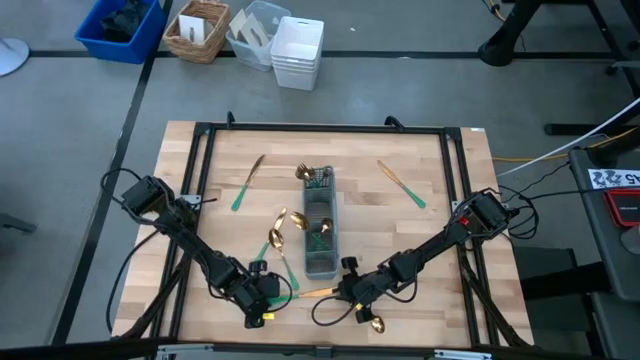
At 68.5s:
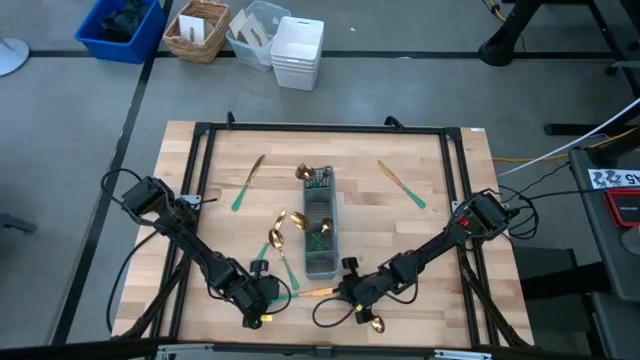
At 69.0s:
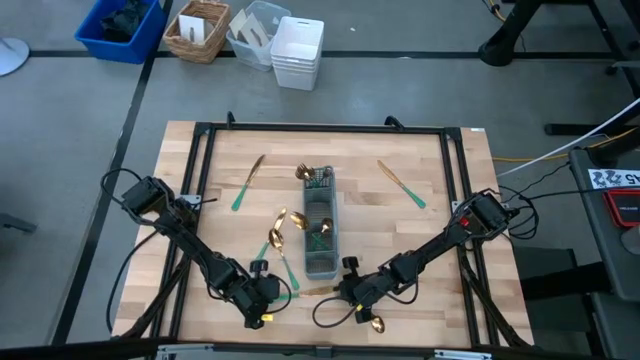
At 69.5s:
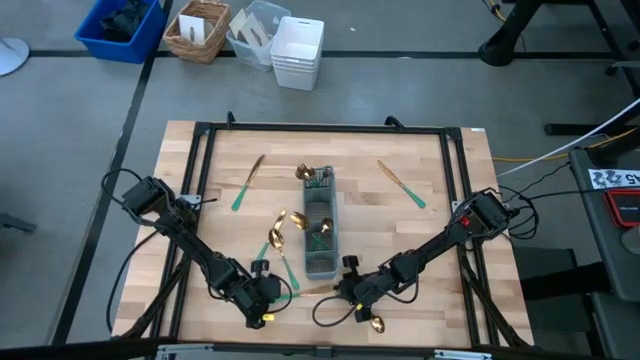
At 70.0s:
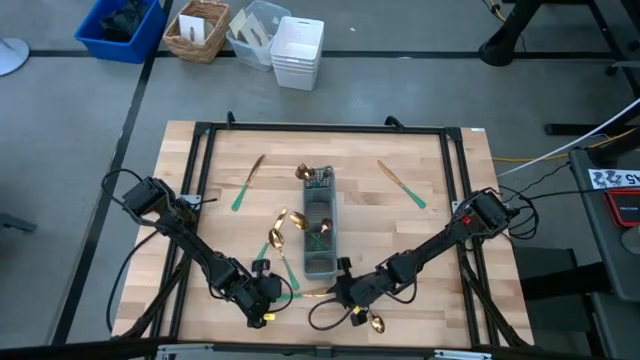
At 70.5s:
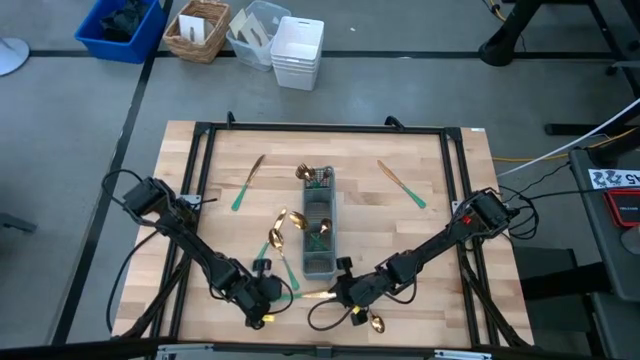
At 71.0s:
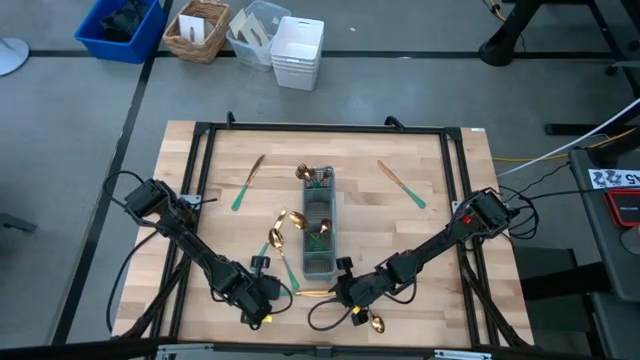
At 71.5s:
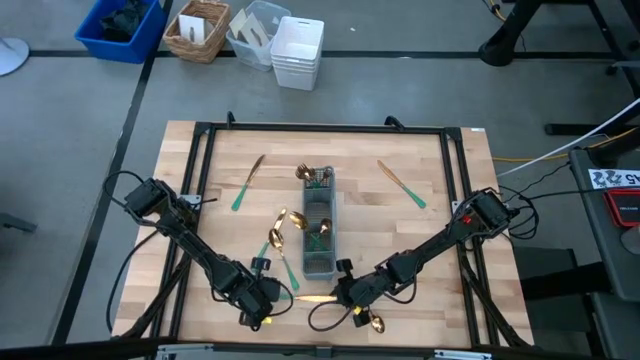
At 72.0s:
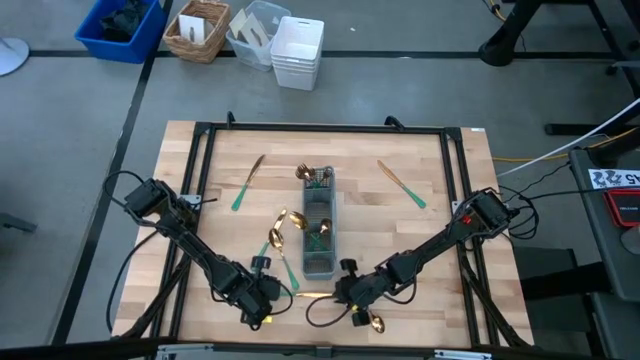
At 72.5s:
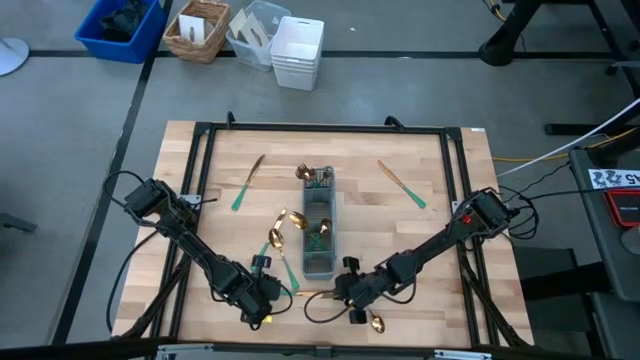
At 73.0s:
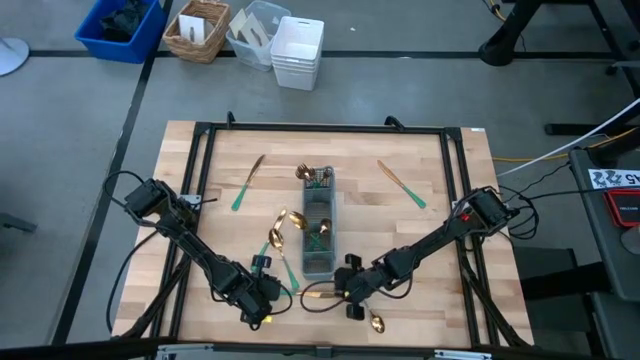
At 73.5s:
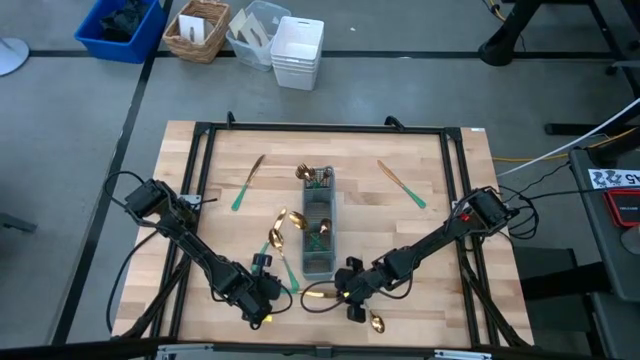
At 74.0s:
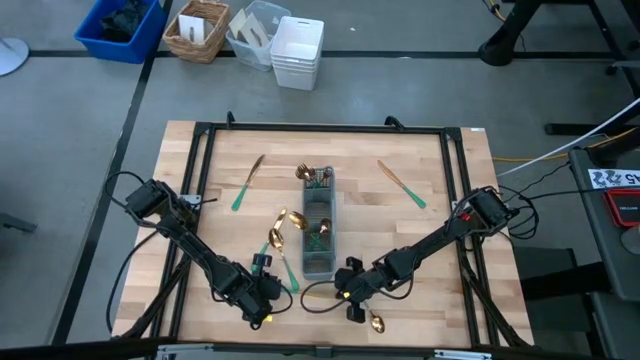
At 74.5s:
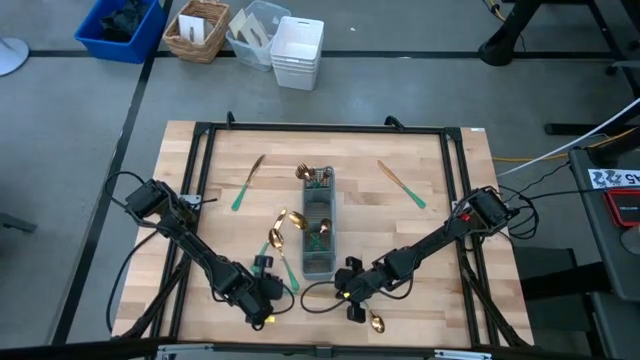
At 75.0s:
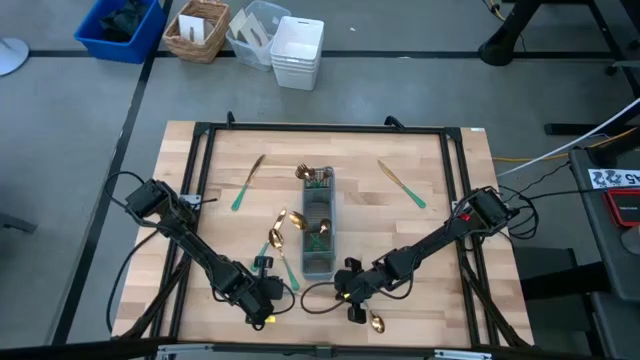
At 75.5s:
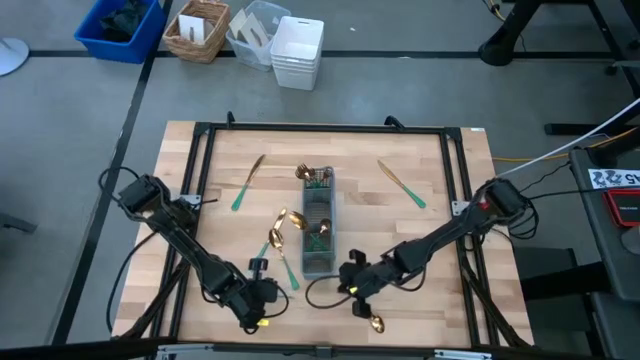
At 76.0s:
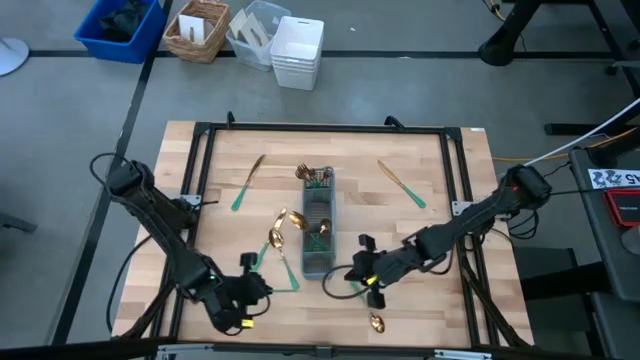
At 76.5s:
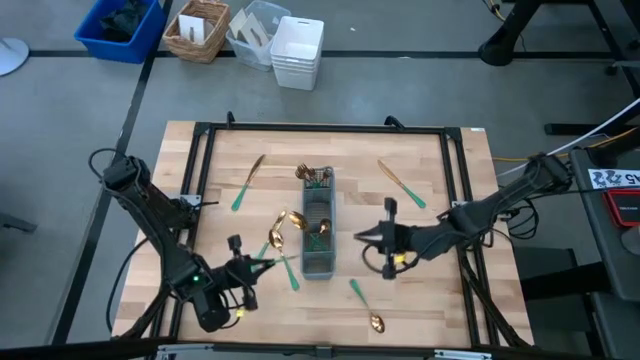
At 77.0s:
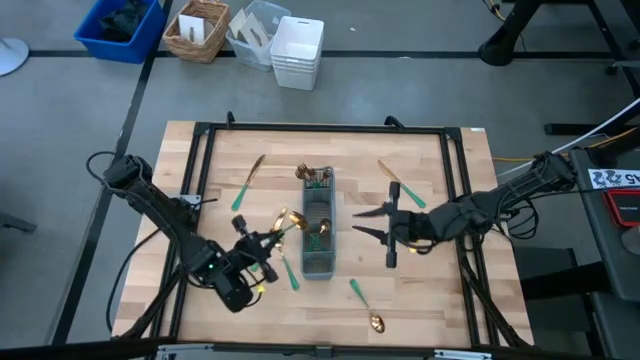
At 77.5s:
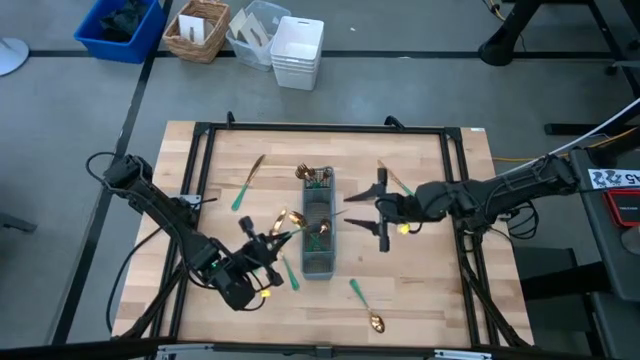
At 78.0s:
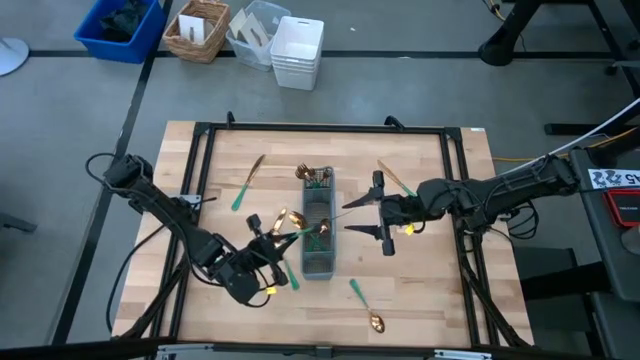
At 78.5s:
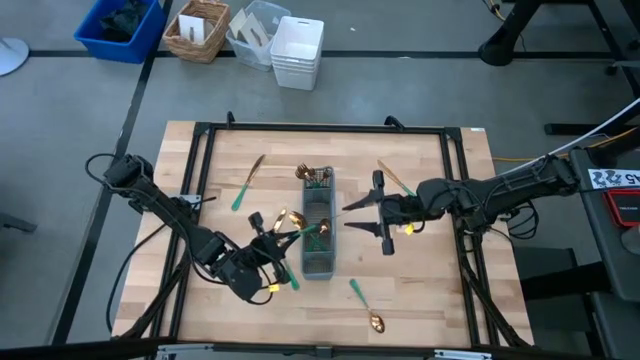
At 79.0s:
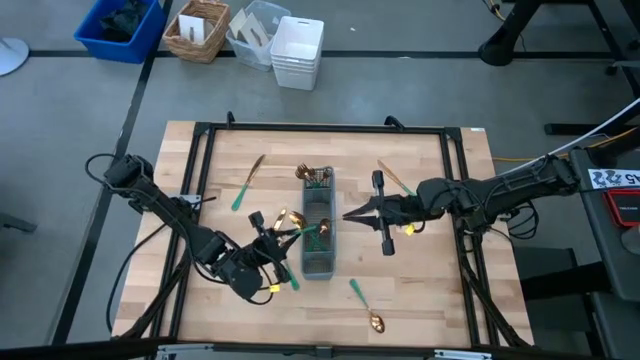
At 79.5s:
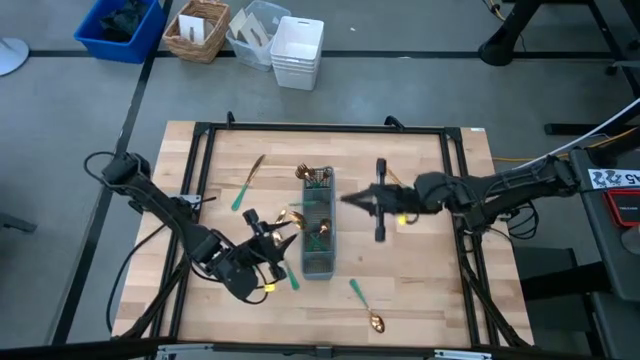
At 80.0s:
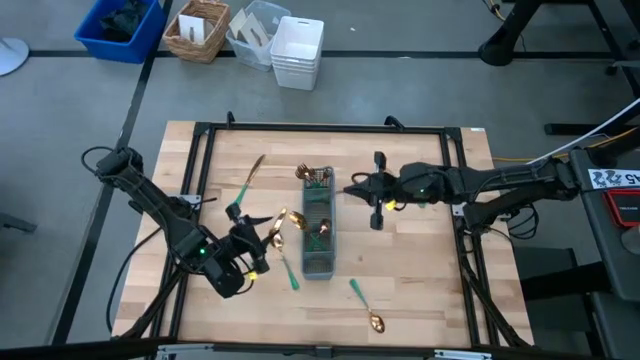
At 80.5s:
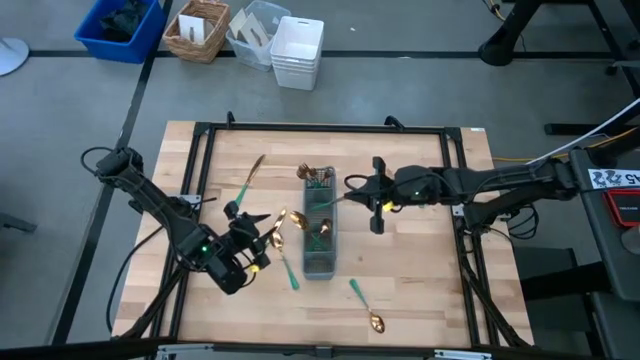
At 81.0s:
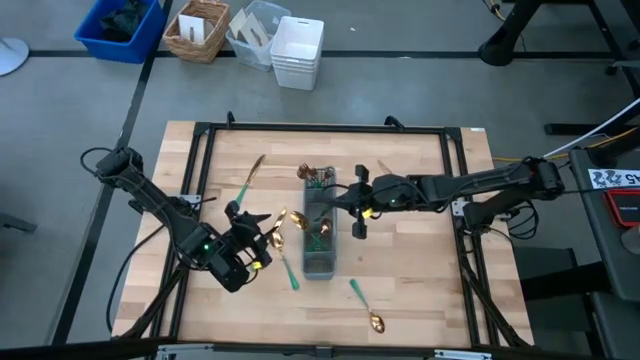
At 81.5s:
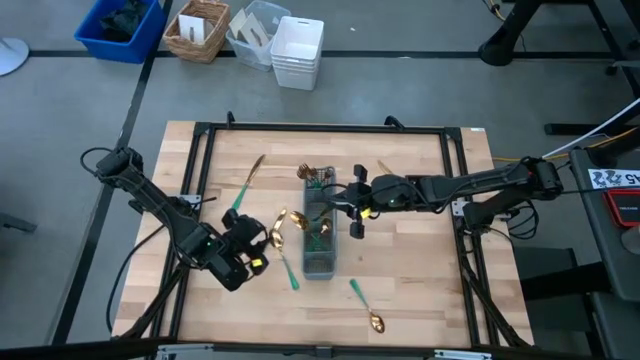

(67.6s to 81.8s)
Task: Sort silverware
Put the green knife into the utensil rack

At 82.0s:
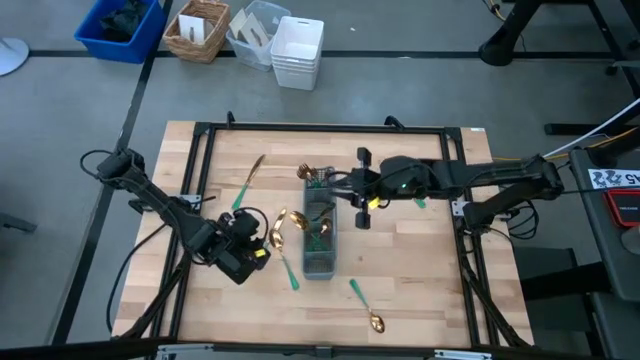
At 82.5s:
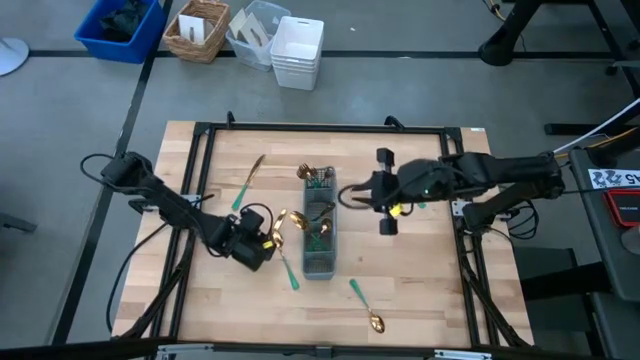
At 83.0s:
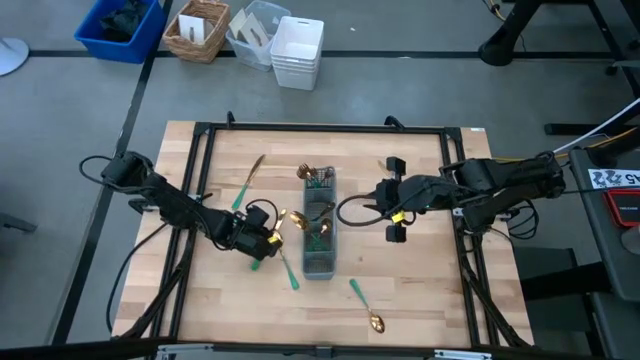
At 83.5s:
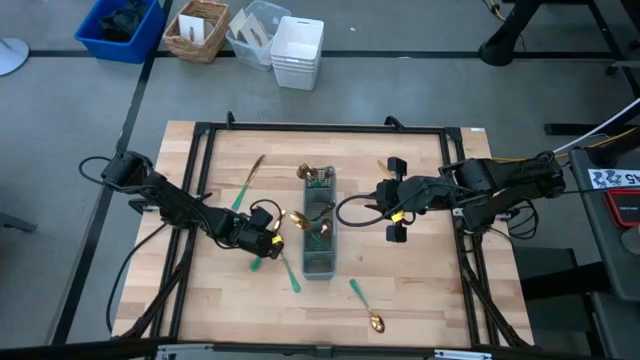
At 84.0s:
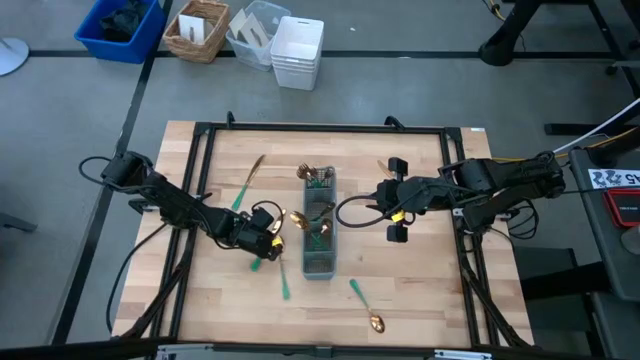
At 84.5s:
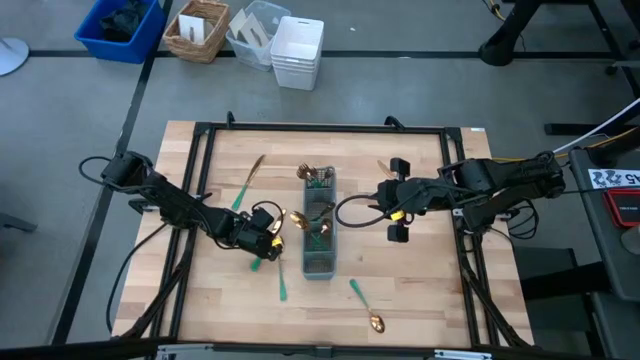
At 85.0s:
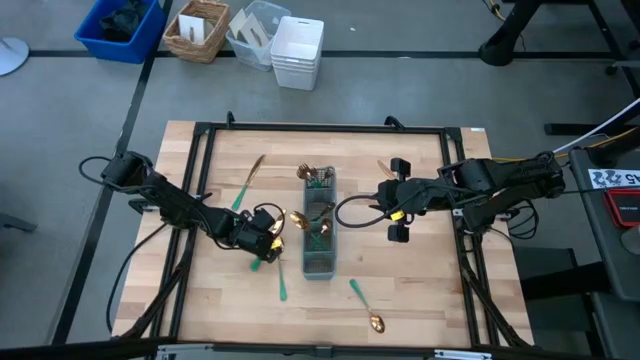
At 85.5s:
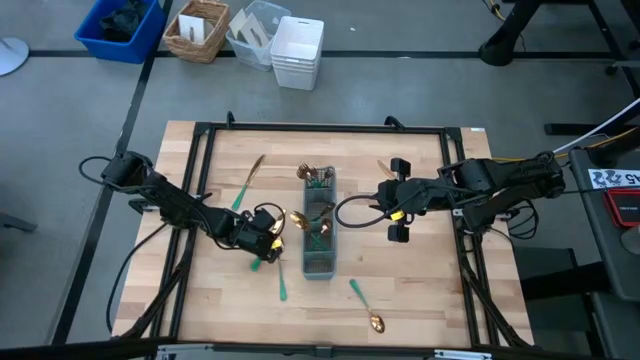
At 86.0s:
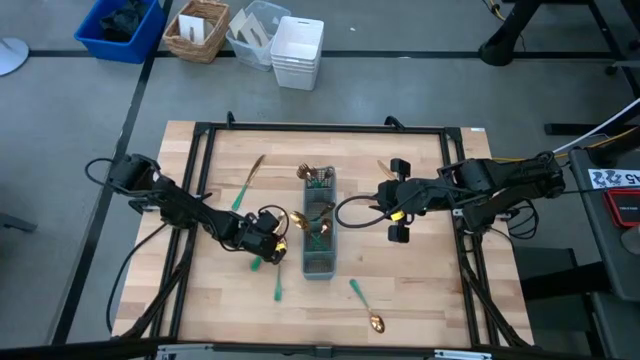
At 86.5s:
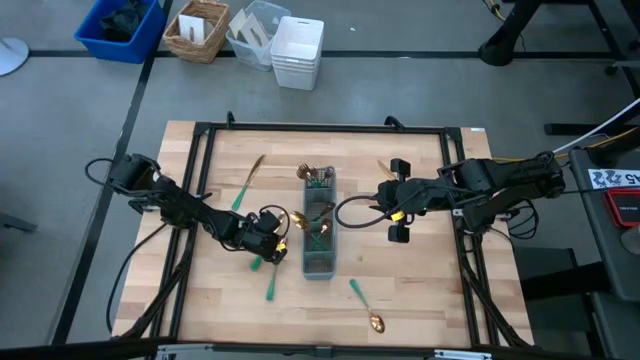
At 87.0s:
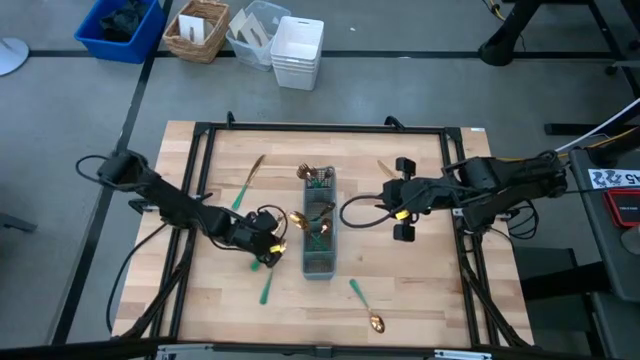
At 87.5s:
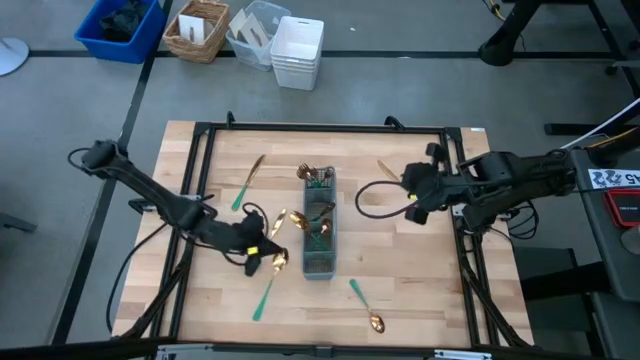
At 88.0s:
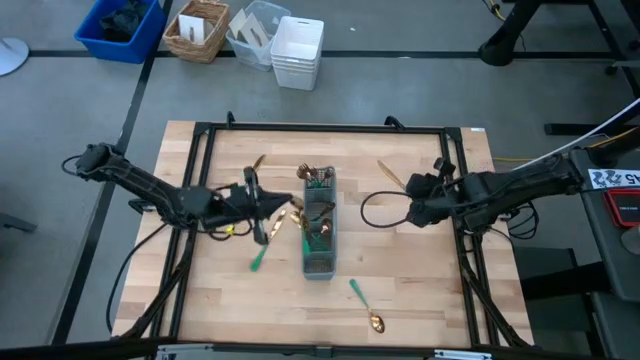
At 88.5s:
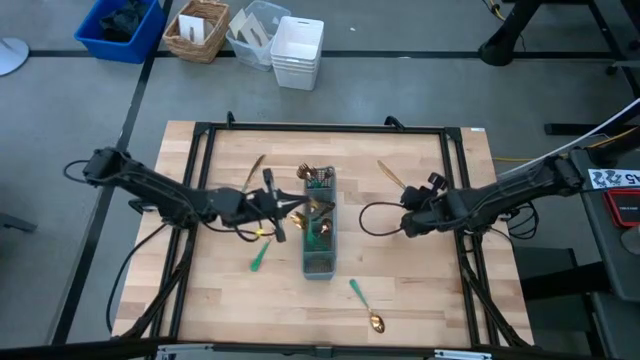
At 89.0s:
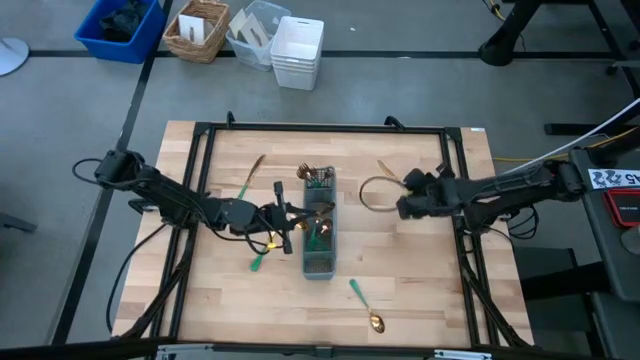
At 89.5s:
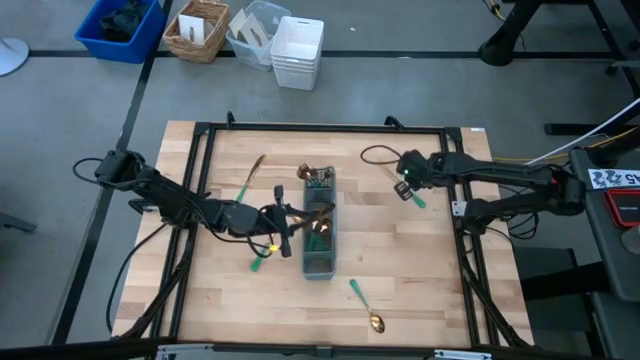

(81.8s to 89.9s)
Put the green spoon into the silverware tray
